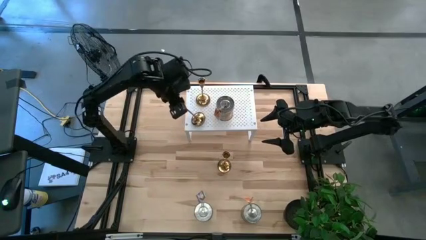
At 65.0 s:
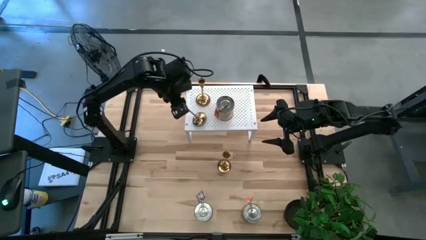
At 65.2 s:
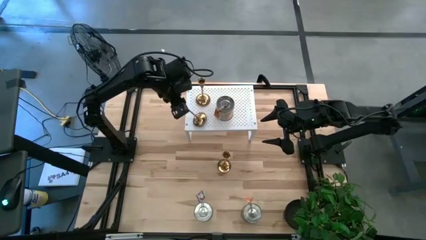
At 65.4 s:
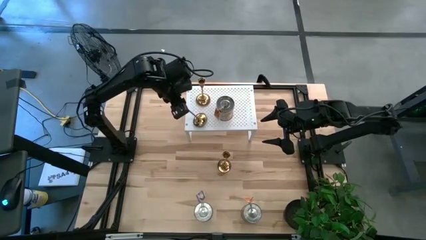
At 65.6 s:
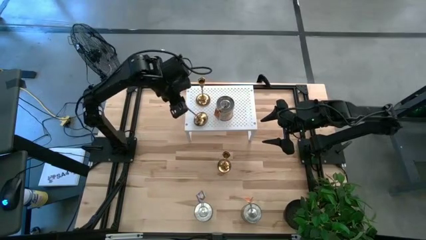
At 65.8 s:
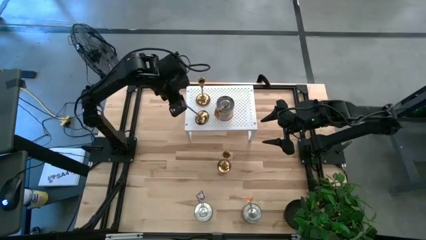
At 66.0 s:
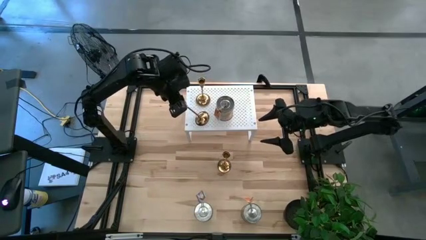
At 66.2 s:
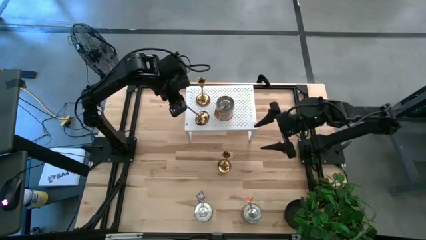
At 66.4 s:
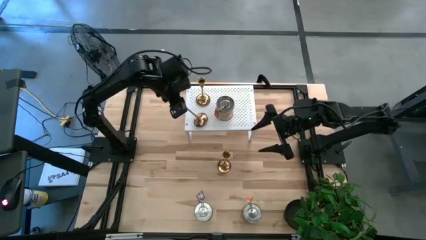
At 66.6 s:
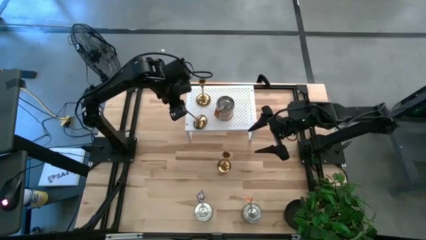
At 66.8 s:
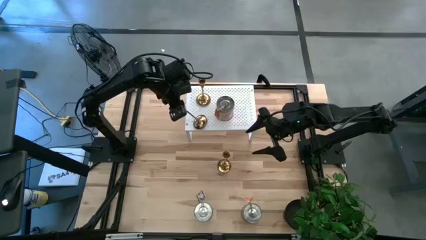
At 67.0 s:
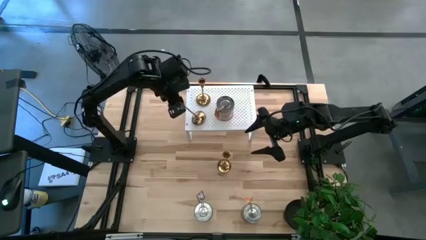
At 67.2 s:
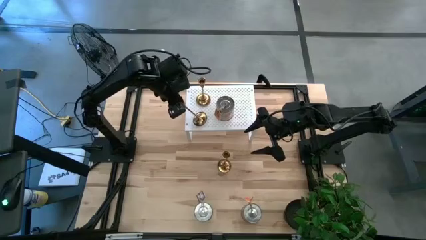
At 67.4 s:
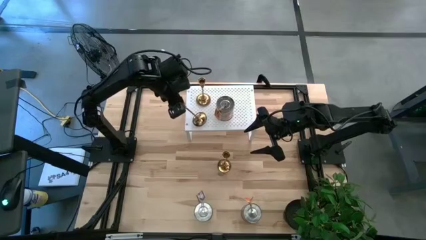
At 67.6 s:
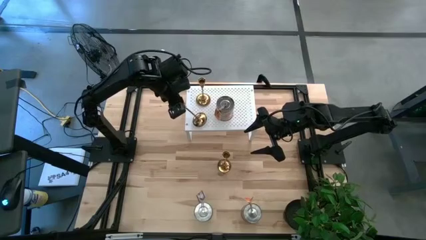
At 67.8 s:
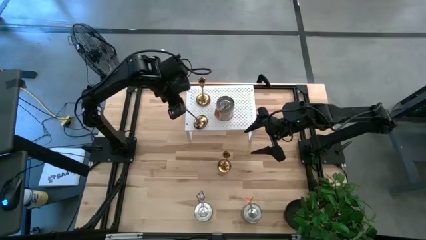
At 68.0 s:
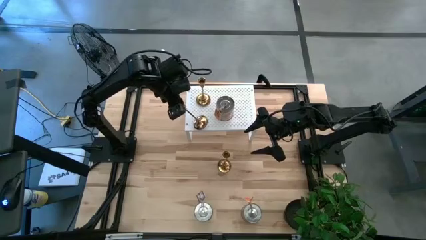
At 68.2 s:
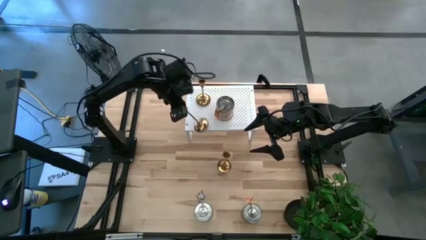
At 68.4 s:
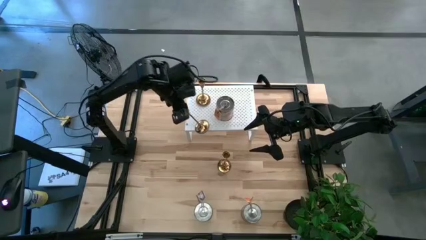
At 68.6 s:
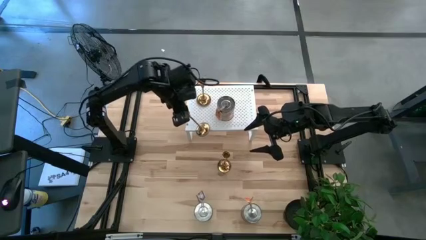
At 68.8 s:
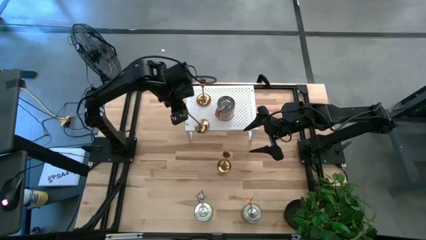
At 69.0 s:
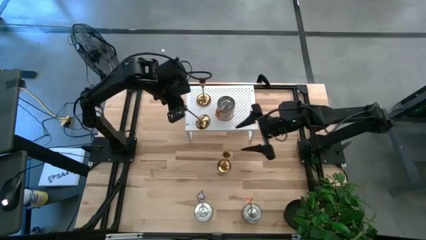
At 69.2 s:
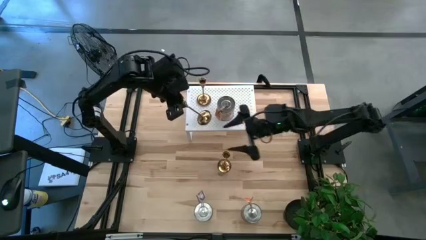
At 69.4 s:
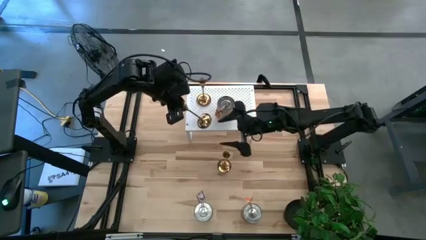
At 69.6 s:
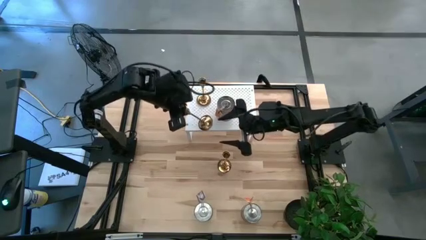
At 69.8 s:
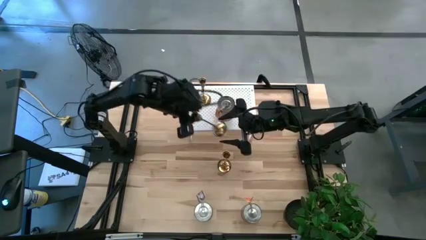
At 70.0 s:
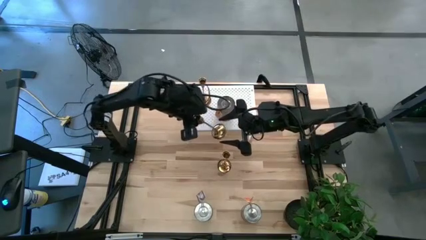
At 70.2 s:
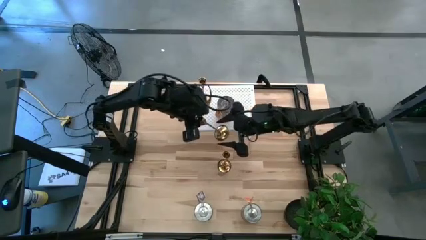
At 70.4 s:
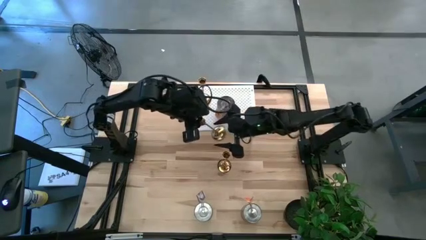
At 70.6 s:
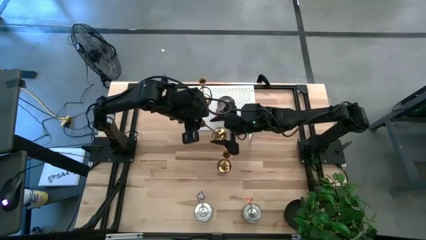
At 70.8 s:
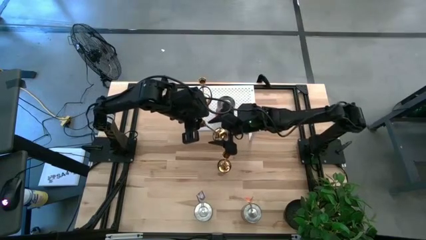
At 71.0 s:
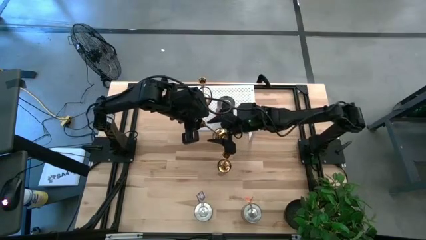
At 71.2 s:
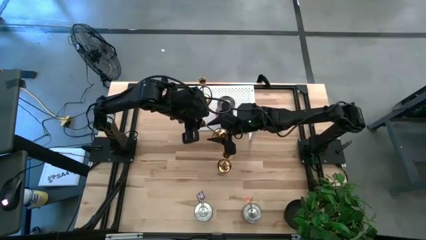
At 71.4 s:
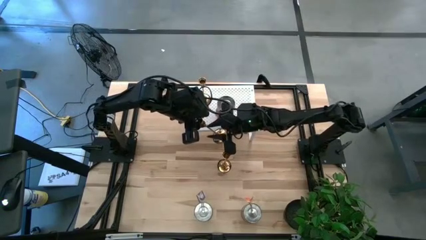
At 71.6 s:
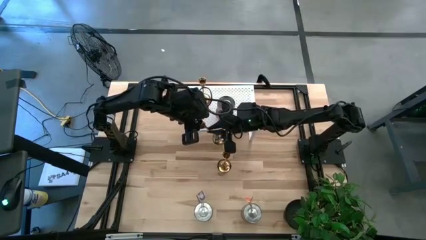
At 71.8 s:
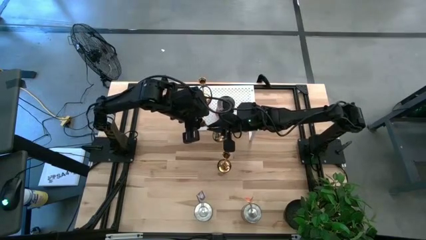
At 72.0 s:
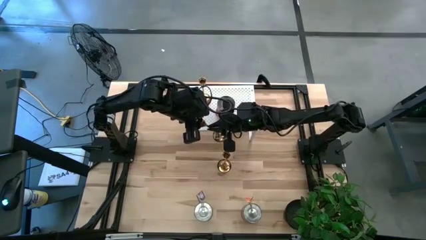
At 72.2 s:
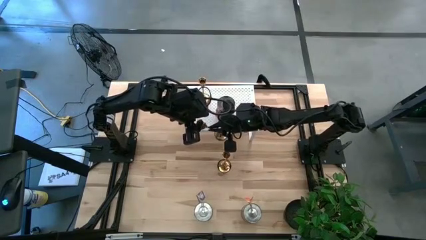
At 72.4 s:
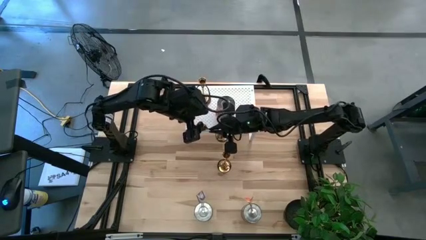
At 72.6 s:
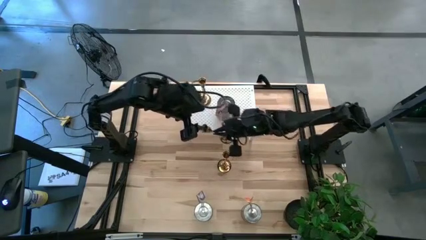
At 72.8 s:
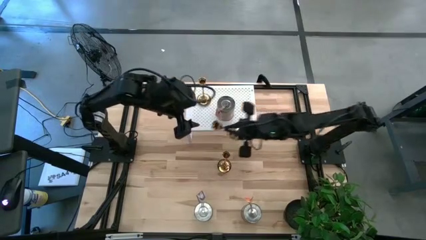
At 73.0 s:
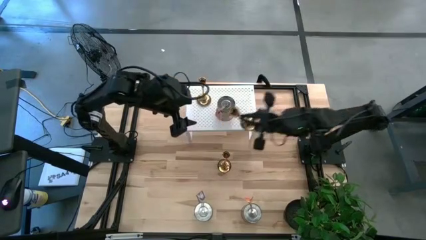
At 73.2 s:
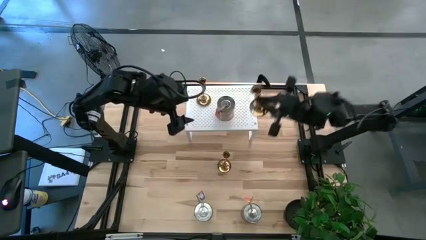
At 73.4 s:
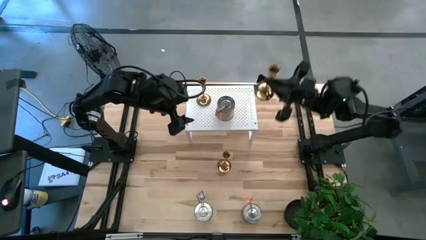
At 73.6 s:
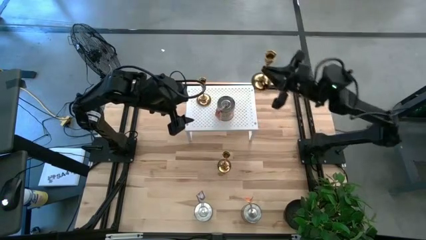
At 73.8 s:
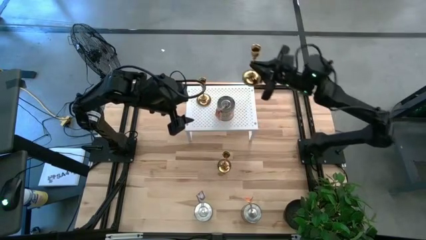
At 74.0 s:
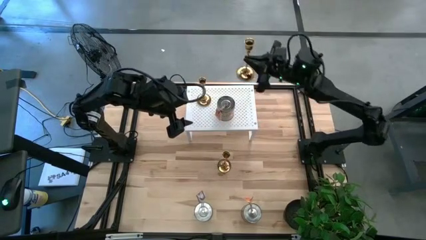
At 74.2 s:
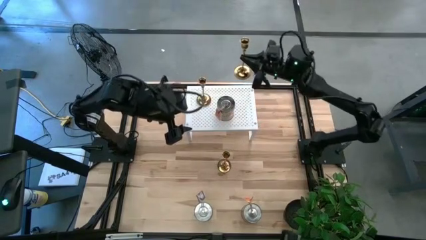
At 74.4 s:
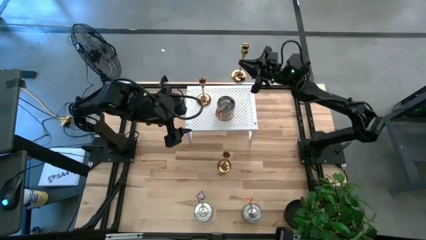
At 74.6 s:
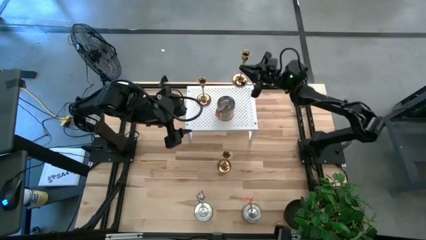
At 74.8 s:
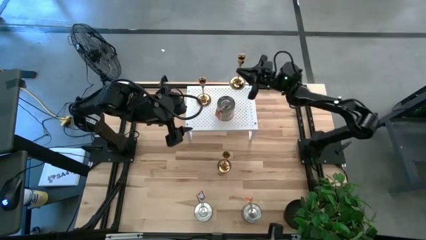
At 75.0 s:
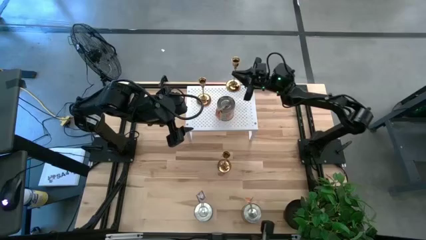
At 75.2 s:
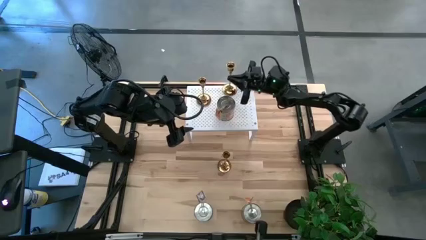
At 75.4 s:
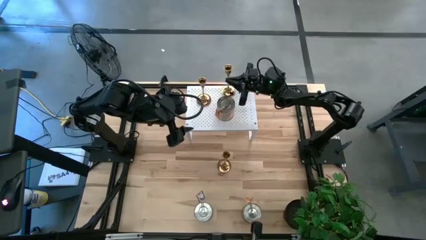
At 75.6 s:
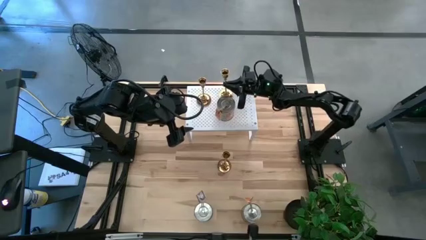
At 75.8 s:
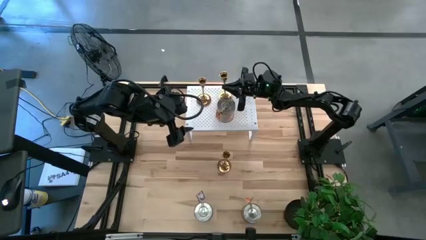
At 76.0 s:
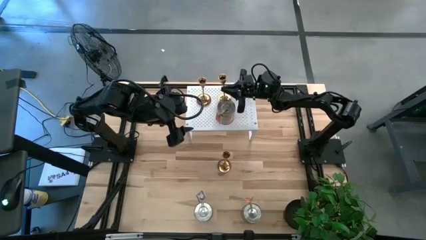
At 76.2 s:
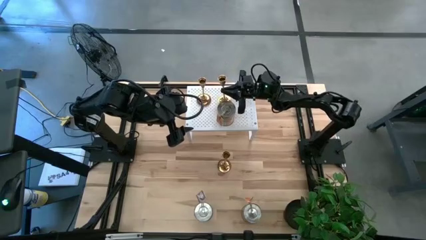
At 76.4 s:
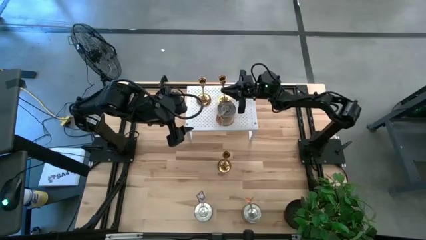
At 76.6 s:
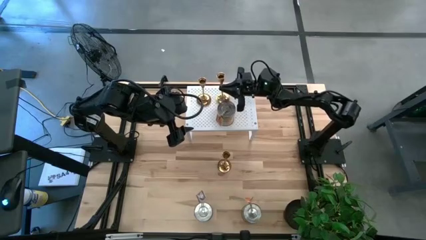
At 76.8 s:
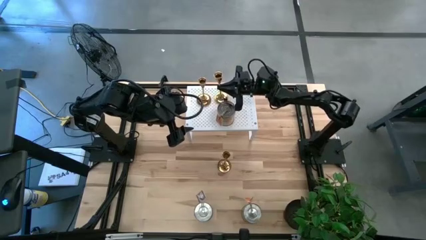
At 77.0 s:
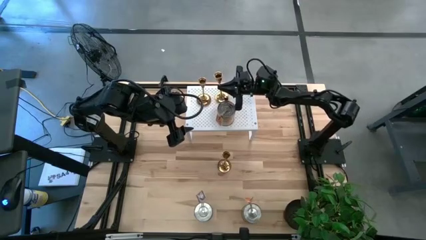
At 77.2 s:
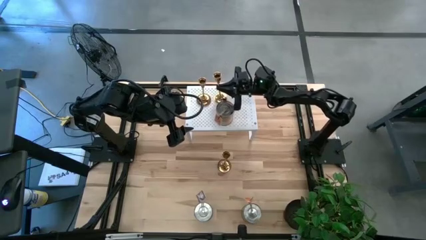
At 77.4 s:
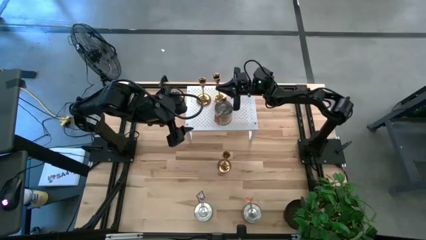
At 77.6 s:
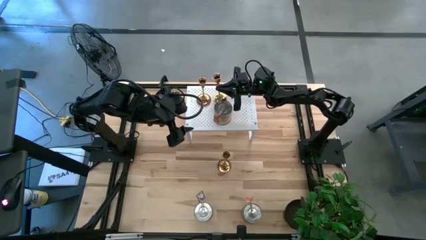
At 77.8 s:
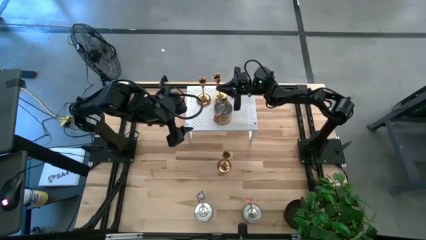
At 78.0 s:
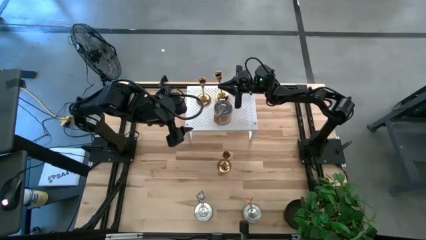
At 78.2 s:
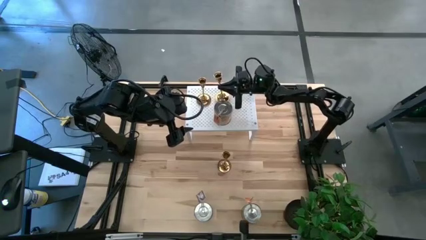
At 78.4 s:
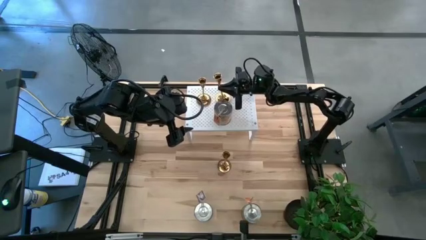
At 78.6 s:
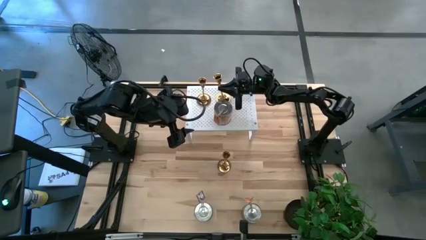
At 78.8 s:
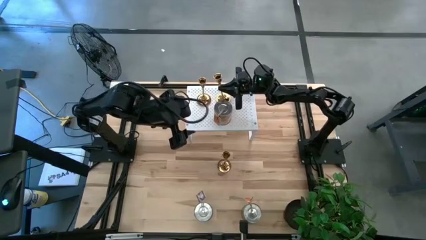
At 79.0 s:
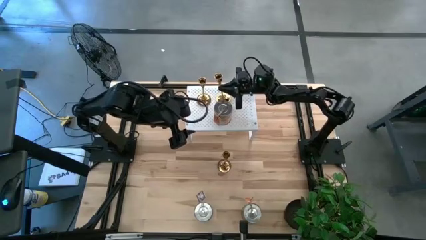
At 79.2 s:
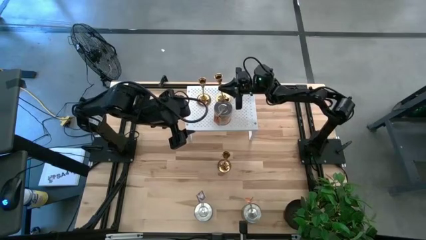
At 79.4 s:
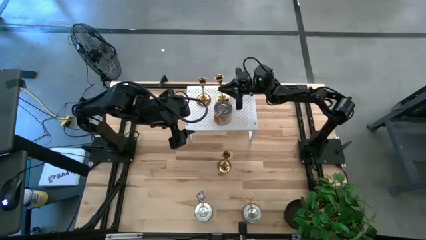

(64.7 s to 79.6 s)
Task: Pick & Place candle stick holders
Put the bottom gold candle holder on the shelf aligned with the other gold candle holder
